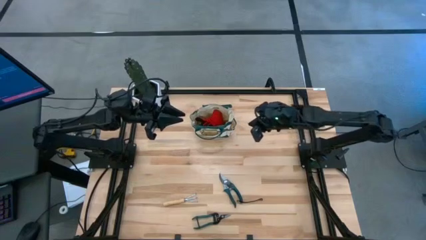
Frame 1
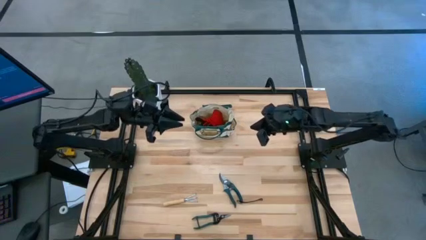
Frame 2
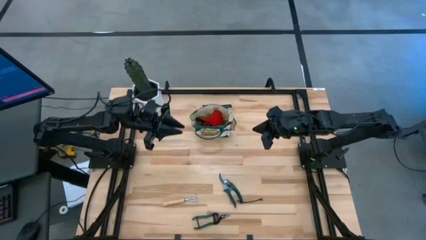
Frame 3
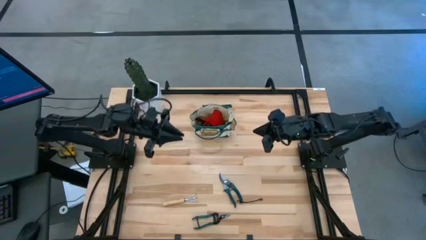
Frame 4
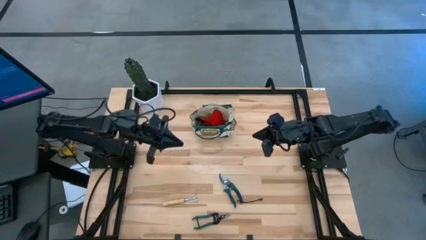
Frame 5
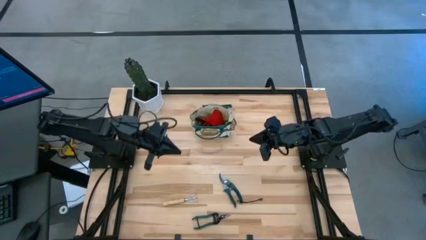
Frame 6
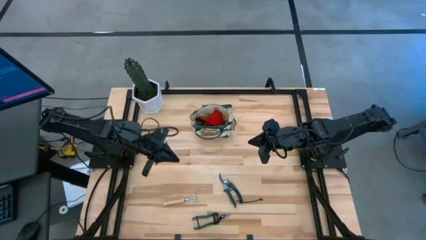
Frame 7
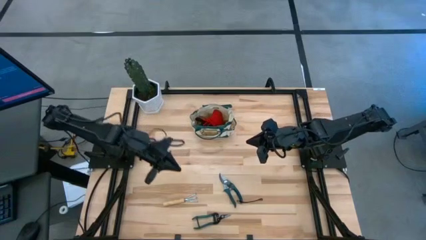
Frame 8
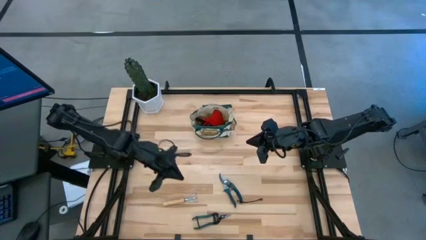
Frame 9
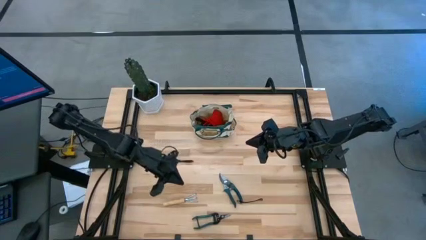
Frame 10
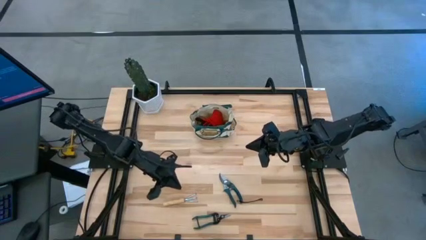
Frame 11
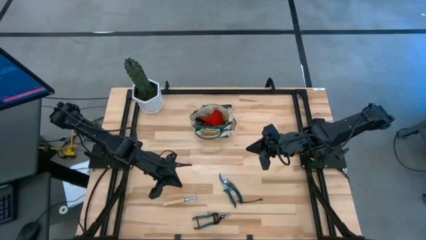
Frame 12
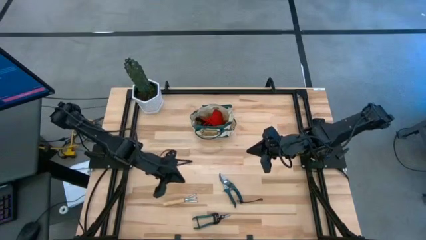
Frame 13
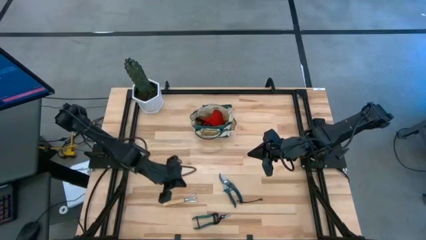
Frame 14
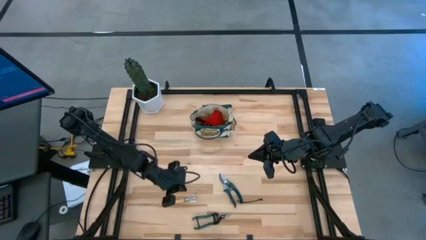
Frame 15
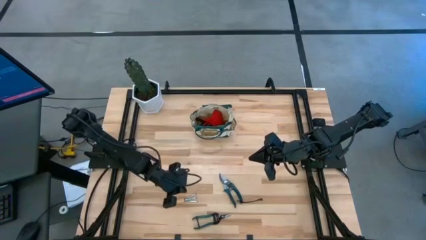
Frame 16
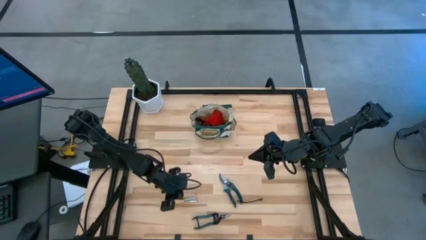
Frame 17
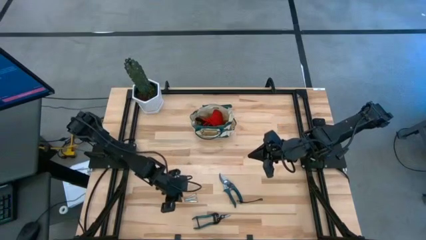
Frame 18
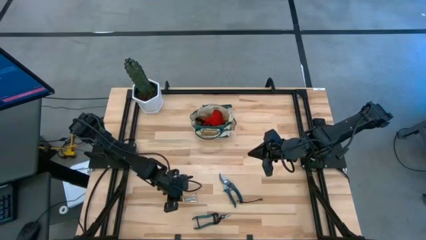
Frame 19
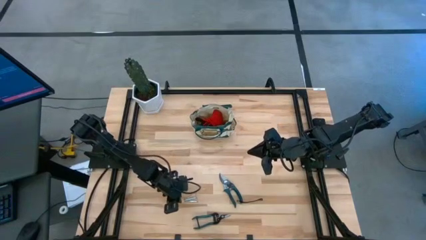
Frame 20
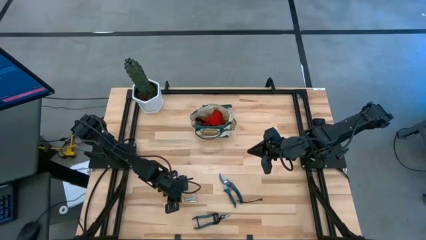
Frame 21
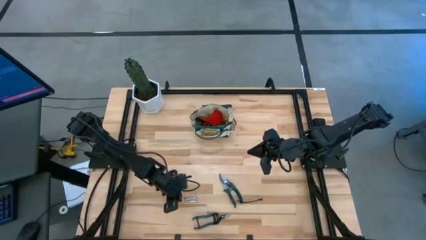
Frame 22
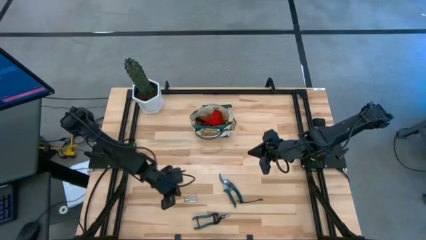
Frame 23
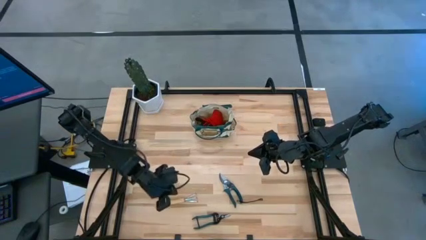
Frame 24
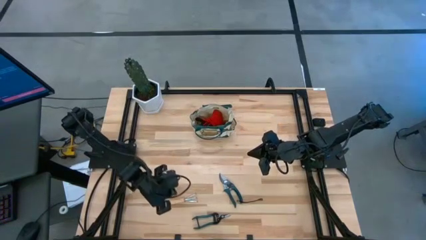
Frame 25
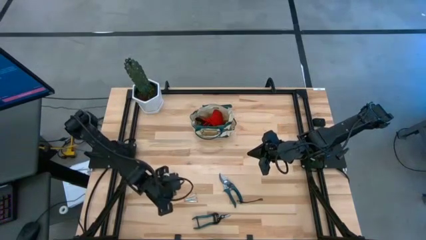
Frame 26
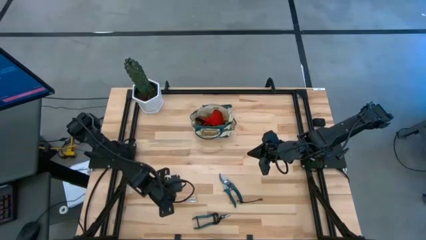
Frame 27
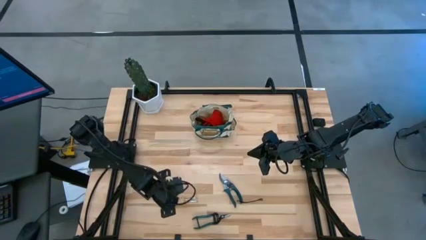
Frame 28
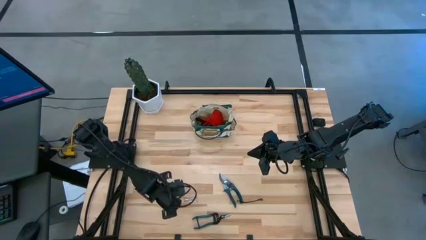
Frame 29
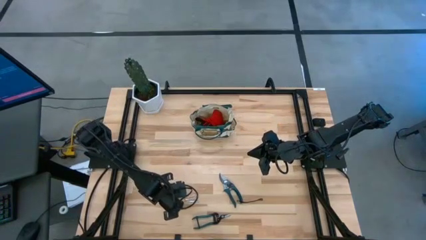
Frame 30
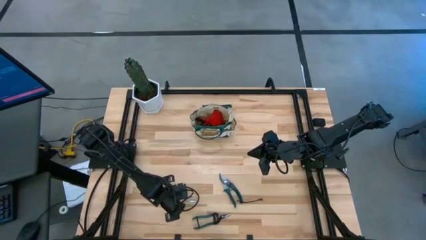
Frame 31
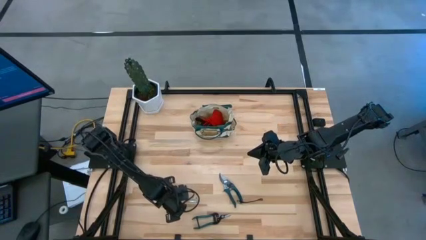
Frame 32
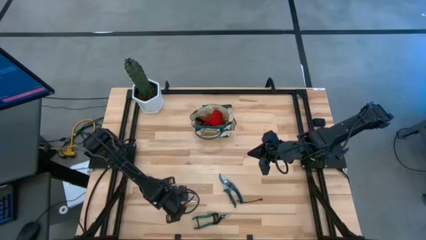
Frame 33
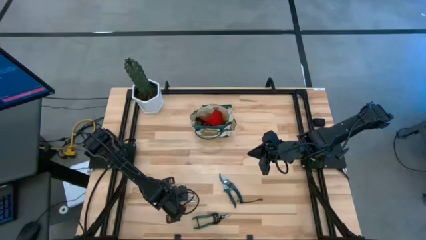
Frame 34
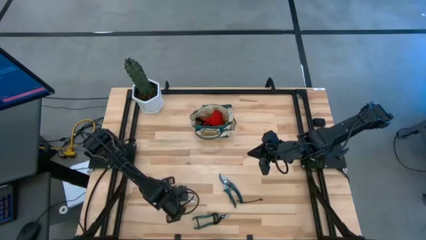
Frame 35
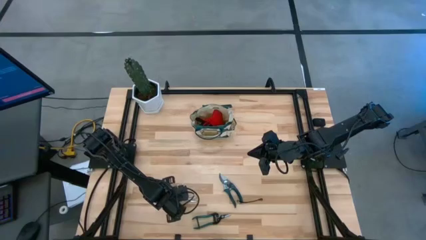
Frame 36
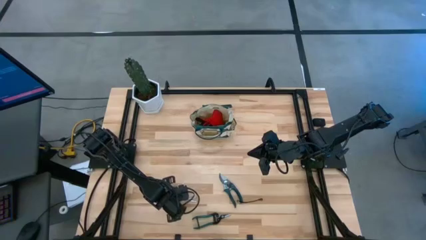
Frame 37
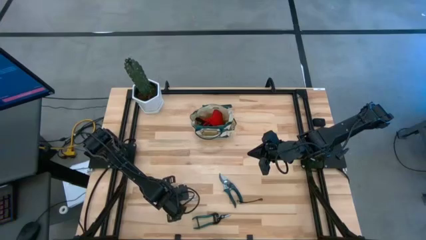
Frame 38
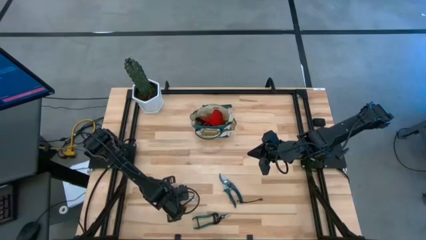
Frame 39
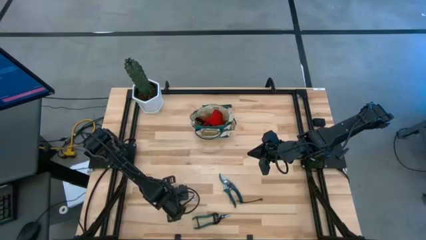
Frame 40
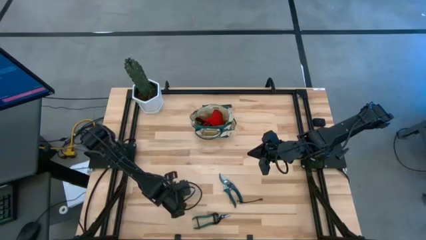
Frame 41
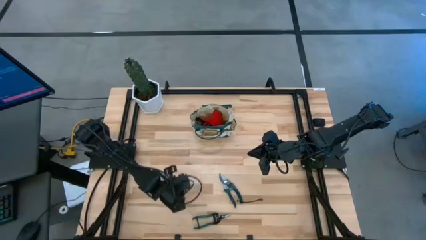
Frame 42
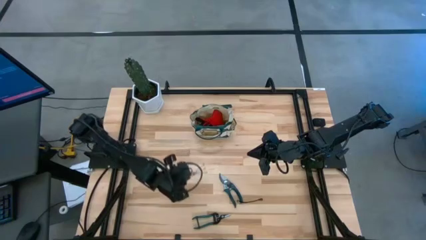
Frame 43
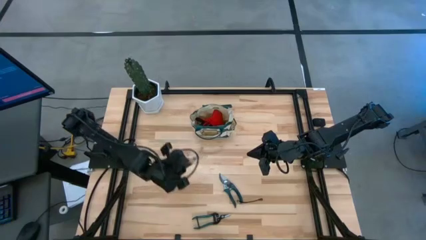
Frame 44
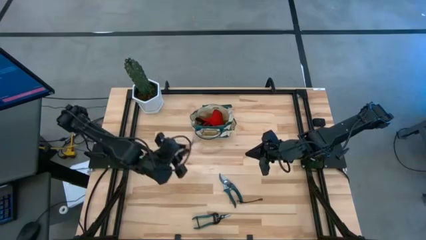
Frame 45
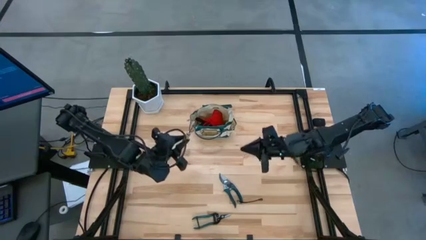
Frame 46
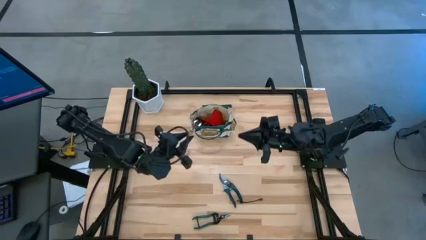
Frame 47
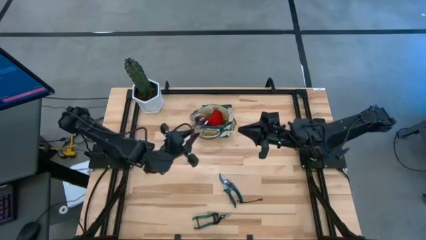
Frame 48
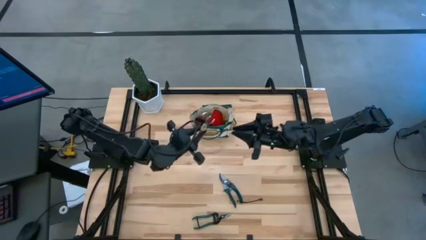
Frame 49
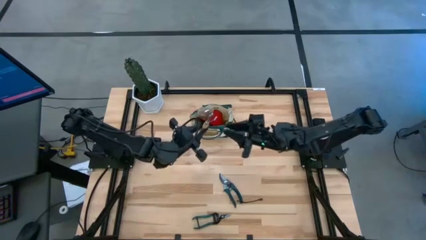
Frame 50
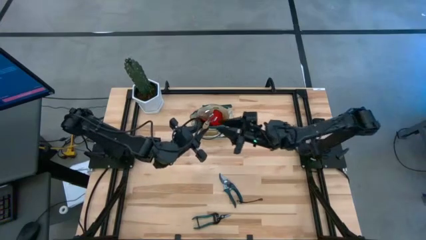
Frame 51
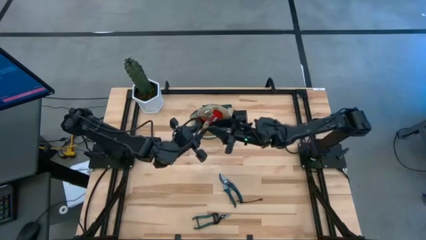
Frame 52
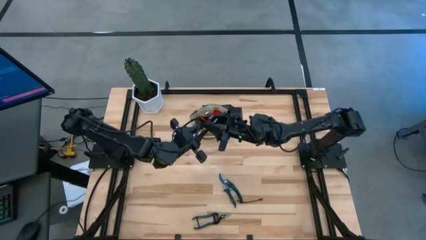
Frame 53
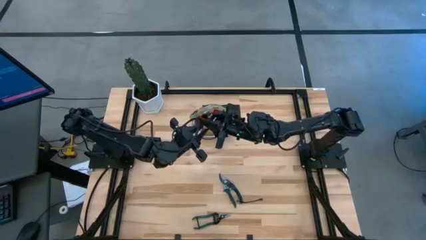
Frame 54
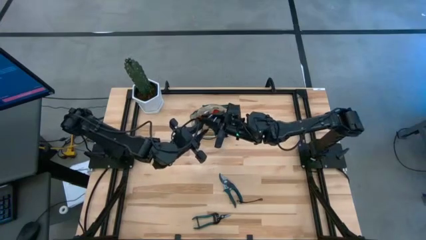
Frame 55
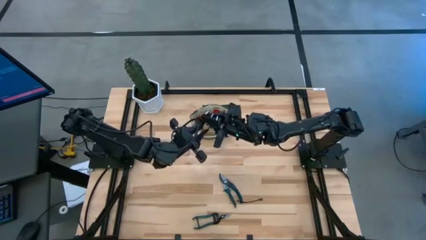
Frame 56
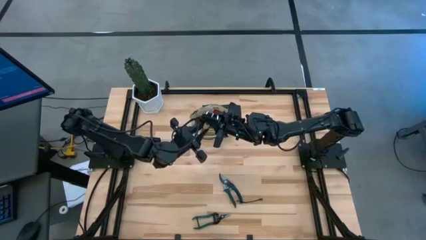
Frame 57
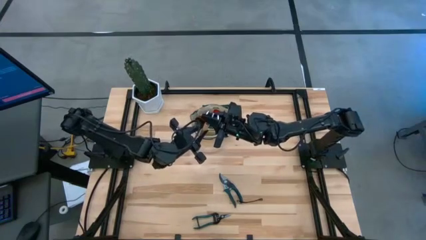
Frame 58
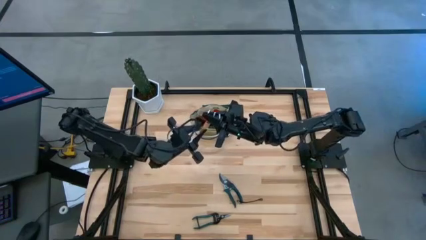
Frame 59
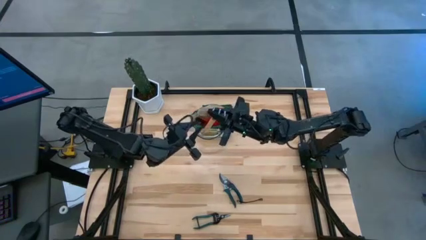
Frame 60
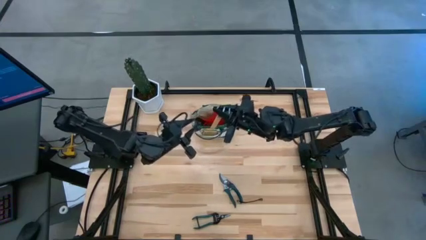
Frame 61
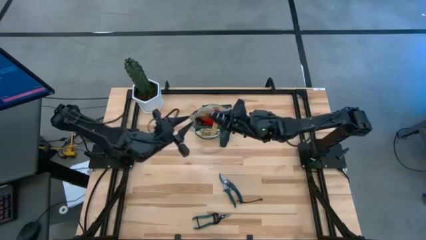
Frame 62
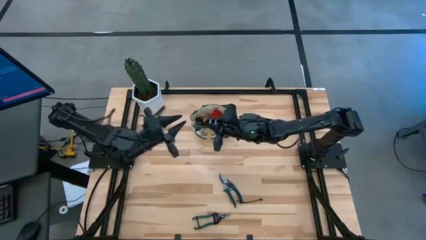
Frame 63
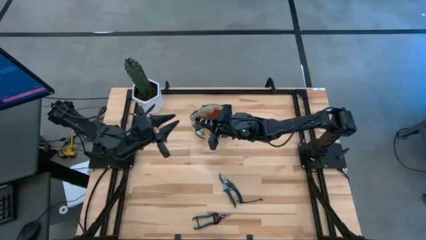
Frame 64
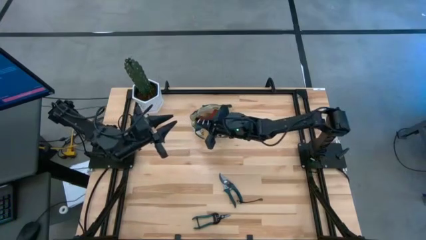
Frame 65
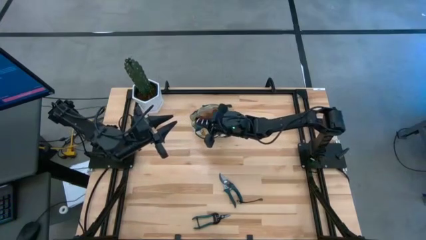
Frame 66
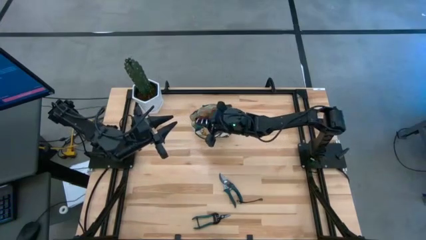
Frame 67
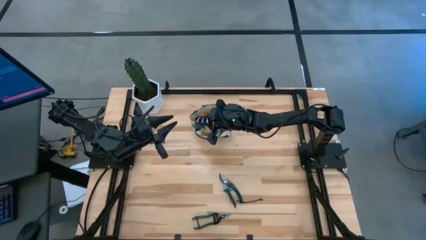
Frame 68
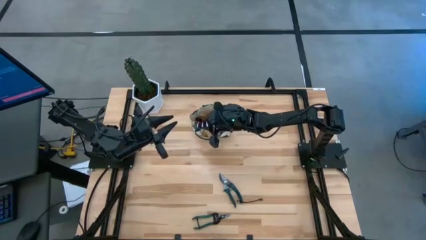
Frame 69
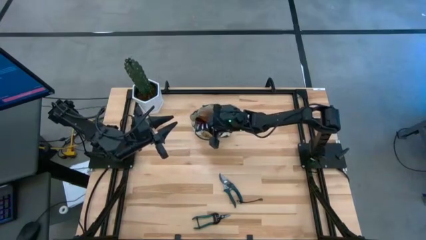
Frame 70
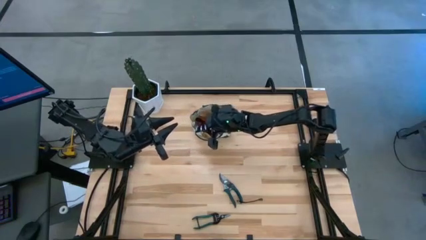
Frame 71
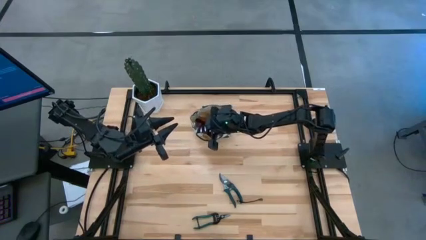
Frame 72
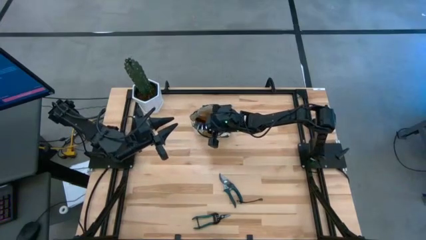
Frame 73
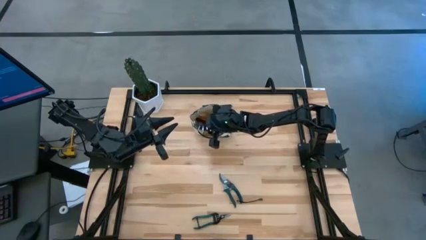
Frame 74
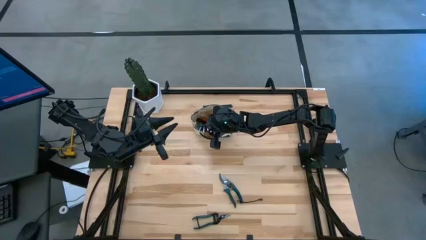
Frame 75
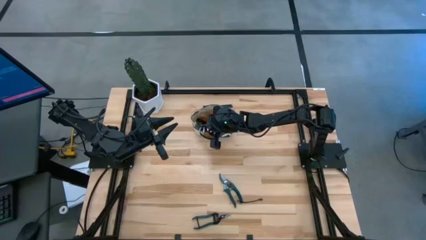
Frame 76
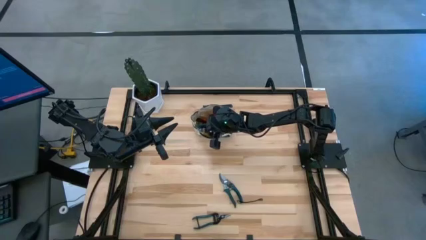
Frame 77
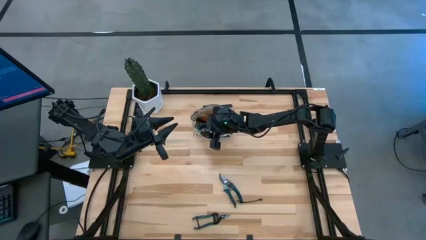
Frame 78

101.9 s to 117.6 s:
Task: Pick & Place Garden tools in Gardening bag
Put the hand rake into the side pocket of the gardening bag
